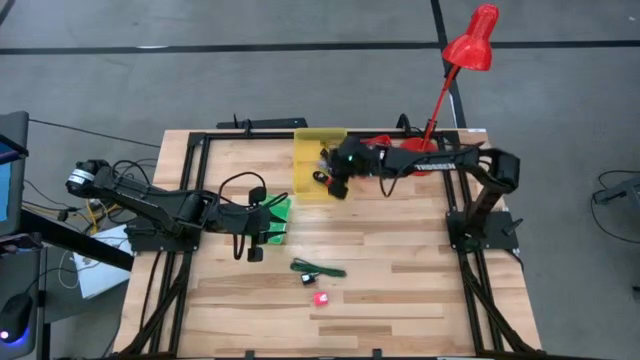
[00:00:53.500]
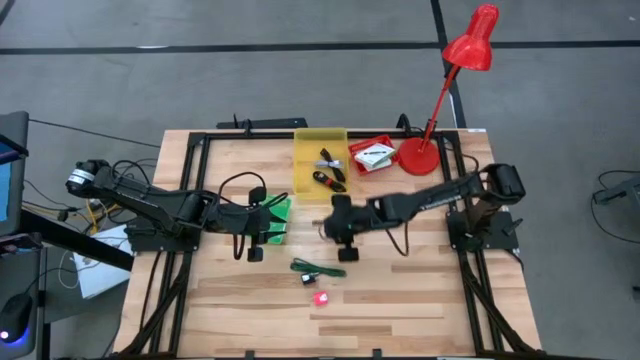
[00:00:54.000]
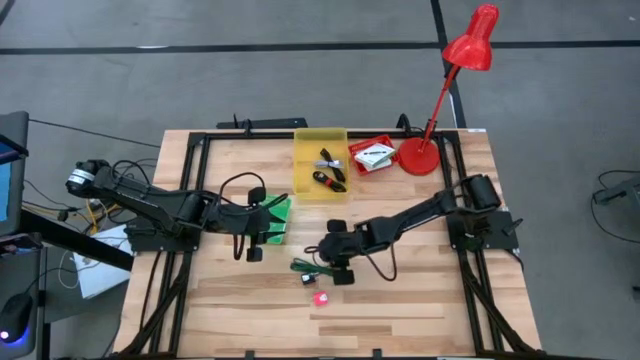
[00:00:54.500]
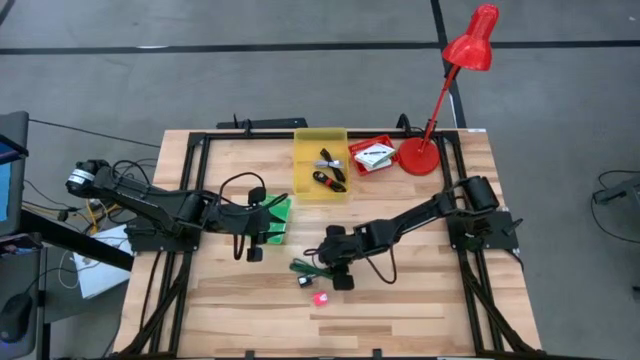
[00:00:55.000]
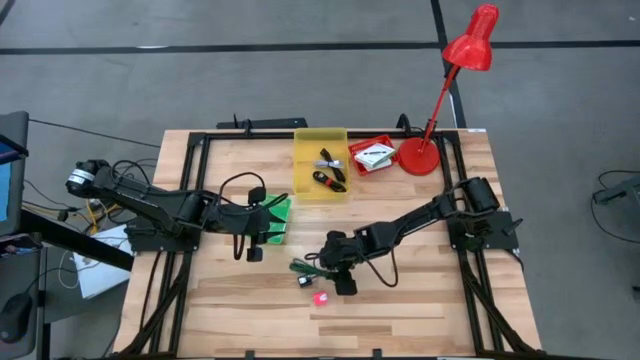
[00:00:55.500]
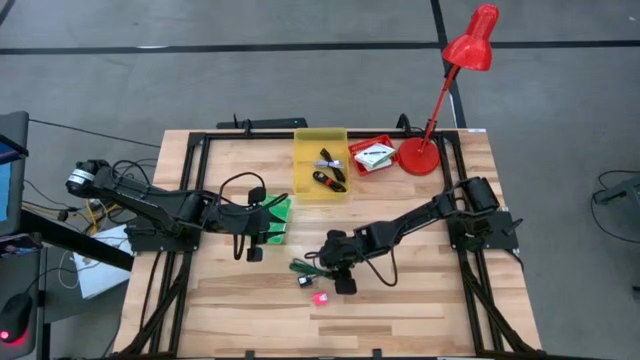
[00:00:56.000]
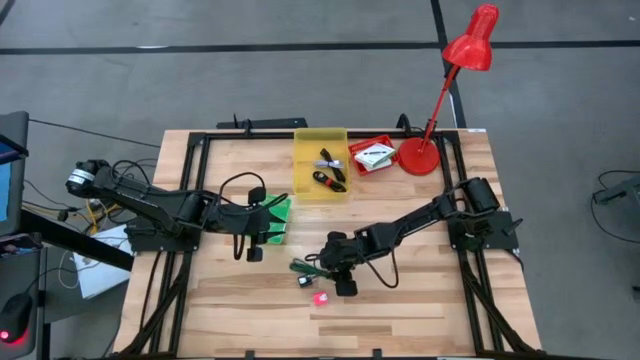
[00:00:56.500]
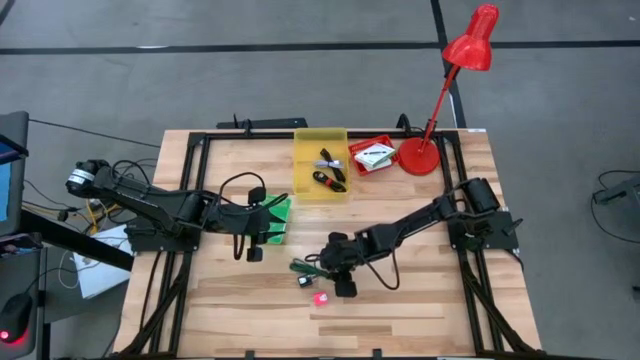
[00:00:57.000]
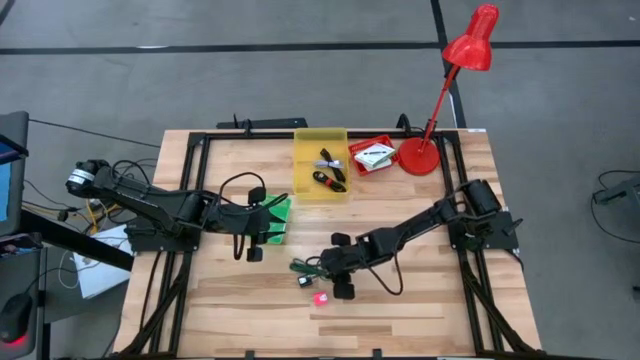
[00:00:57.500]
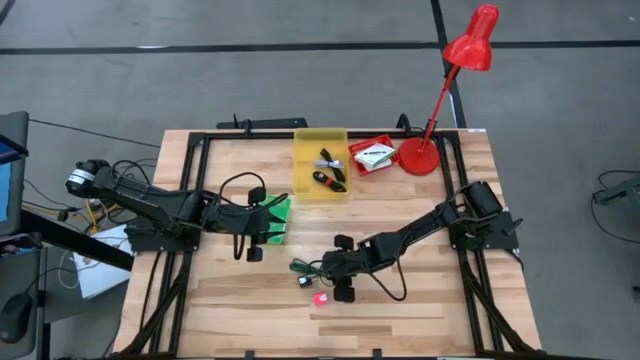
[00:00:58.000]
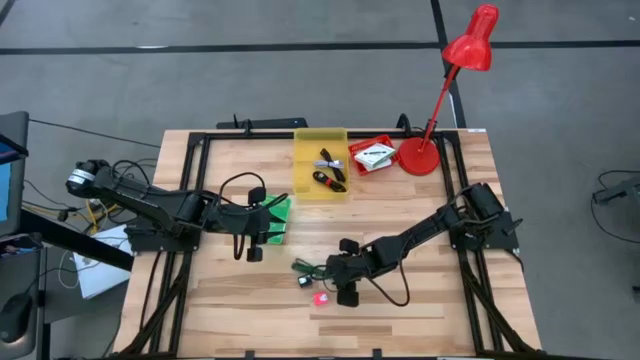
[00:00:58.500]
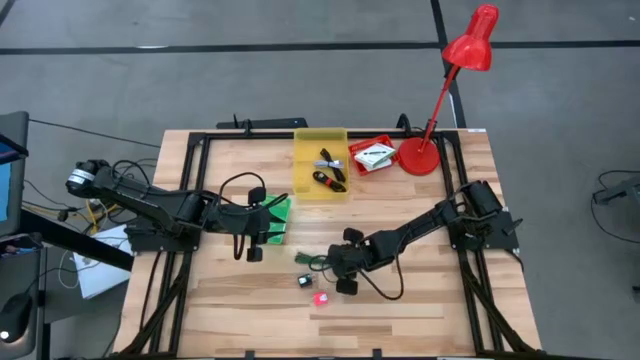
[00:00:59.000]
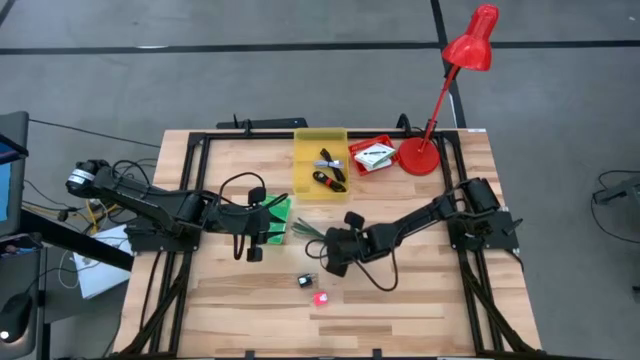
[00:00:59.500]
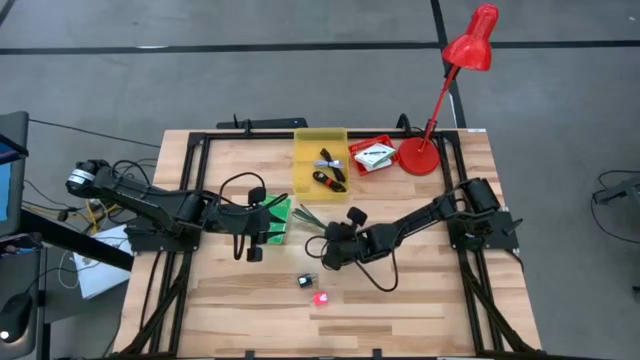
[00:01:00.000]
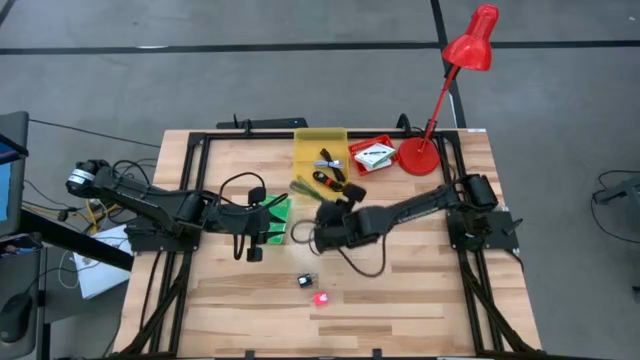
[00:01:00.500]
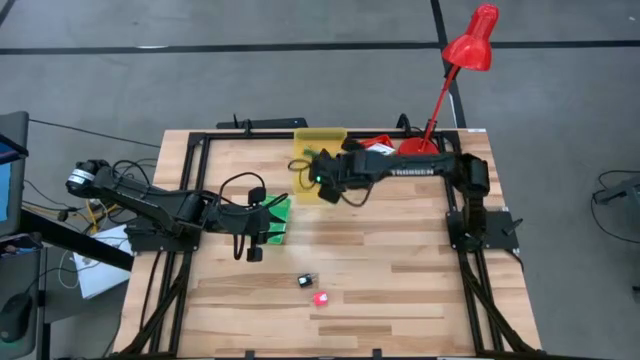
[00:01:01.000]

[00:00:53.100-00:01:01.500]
Task: Pick and place items into bin
Put the green charger cable into the yellow bin

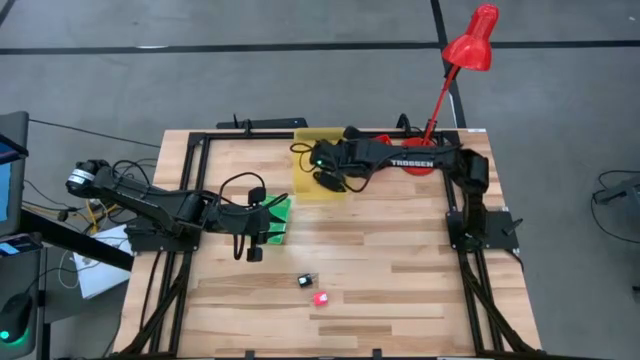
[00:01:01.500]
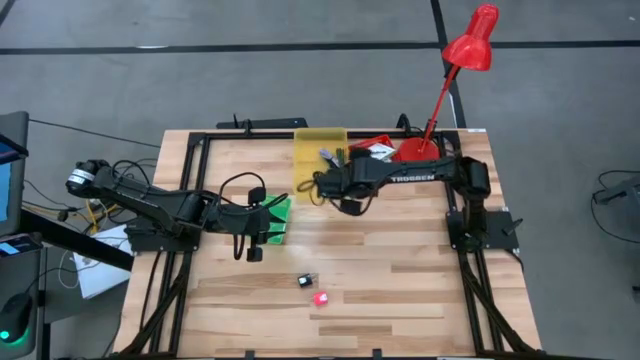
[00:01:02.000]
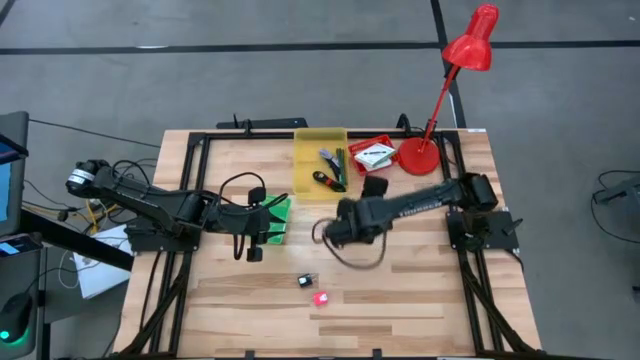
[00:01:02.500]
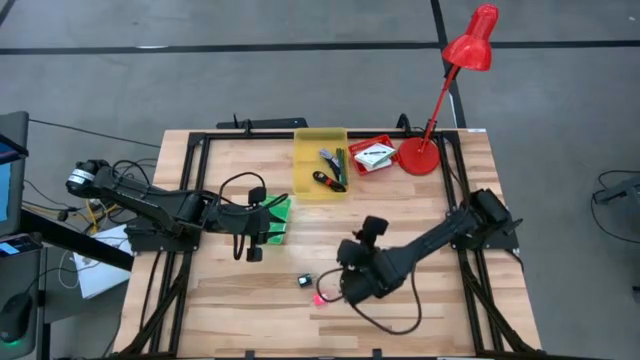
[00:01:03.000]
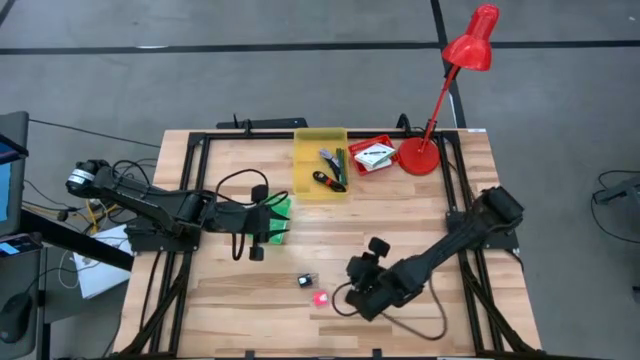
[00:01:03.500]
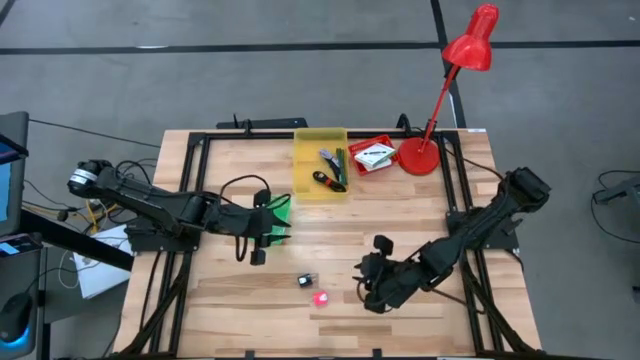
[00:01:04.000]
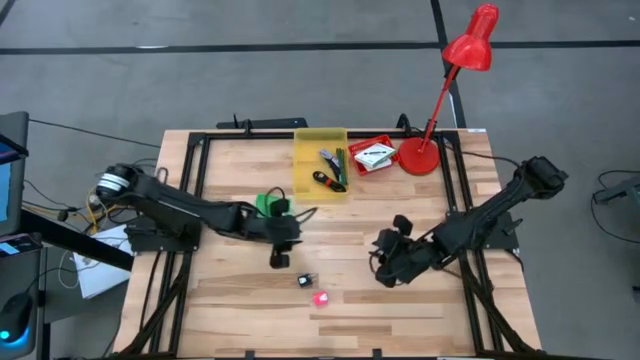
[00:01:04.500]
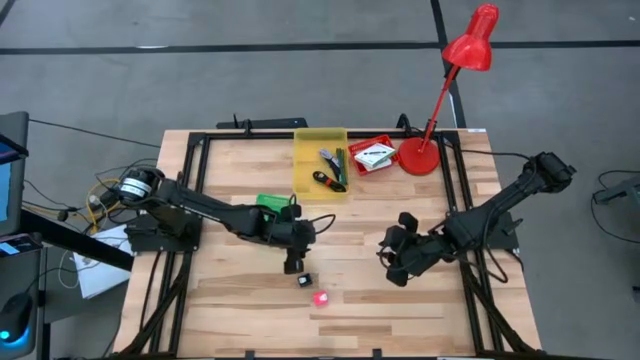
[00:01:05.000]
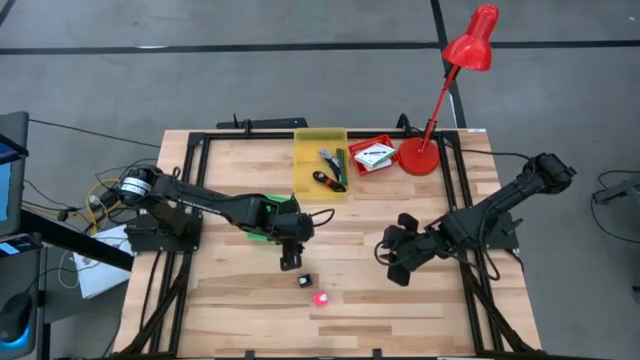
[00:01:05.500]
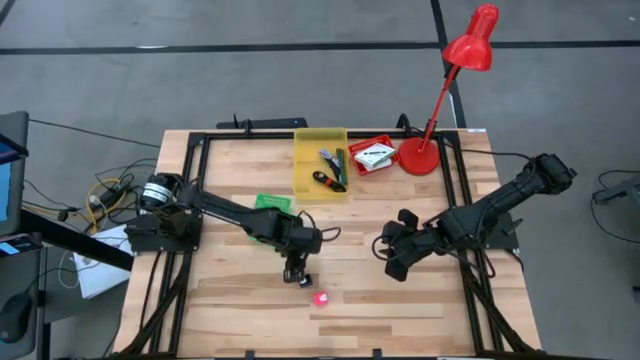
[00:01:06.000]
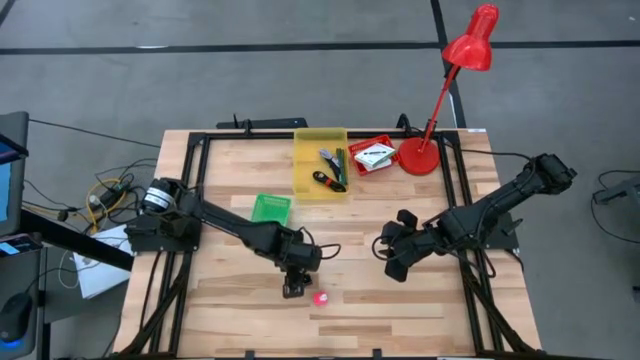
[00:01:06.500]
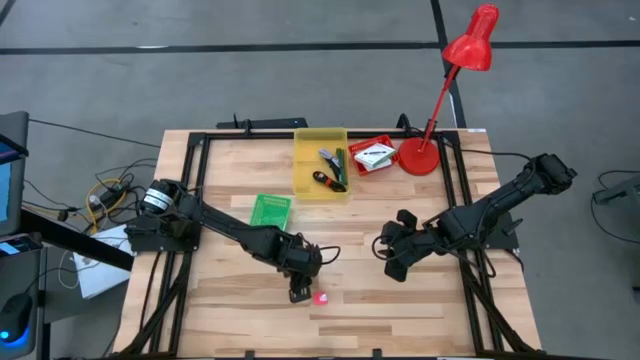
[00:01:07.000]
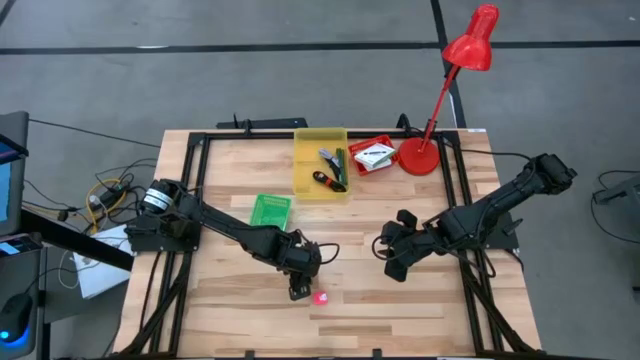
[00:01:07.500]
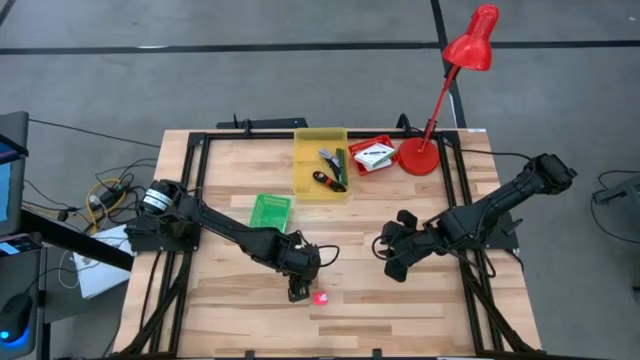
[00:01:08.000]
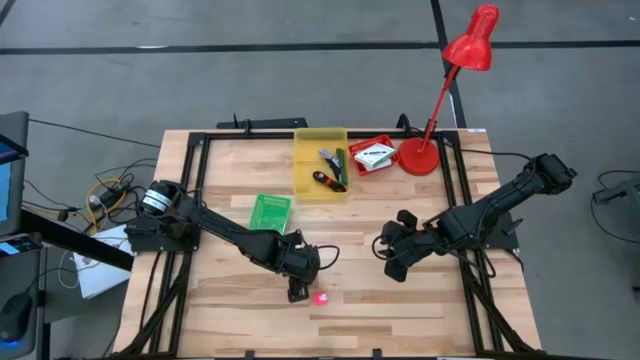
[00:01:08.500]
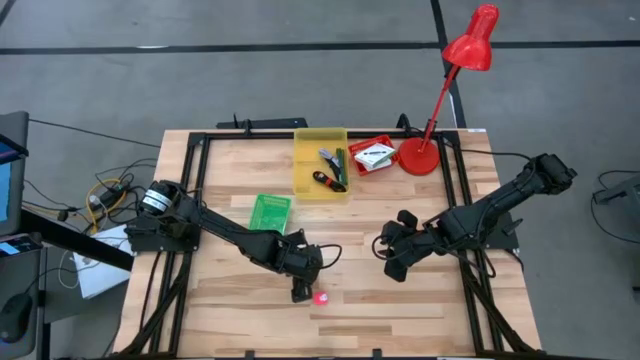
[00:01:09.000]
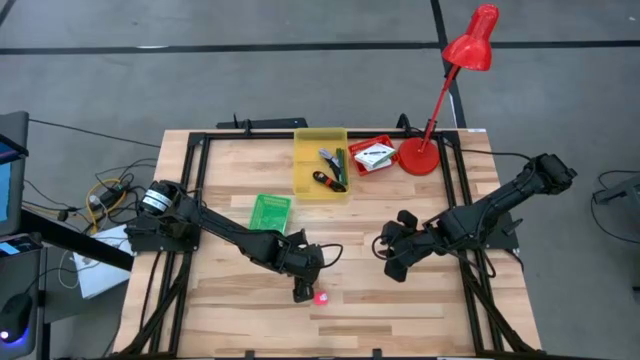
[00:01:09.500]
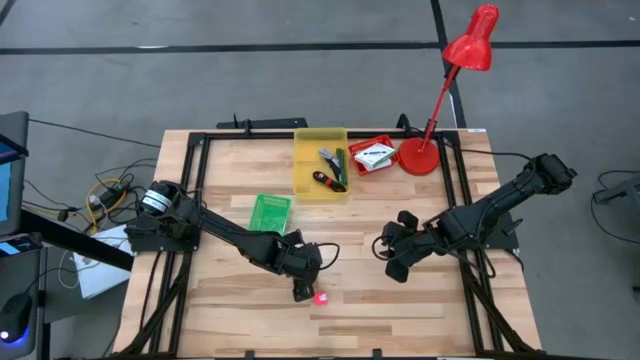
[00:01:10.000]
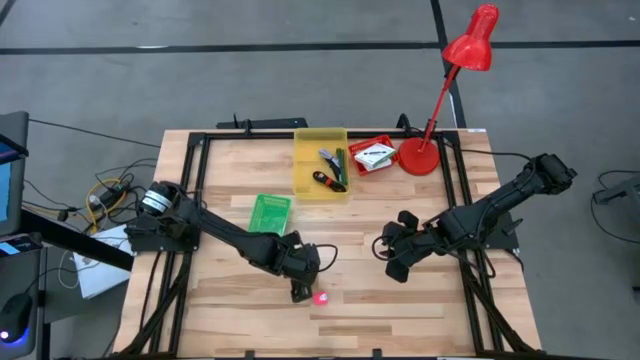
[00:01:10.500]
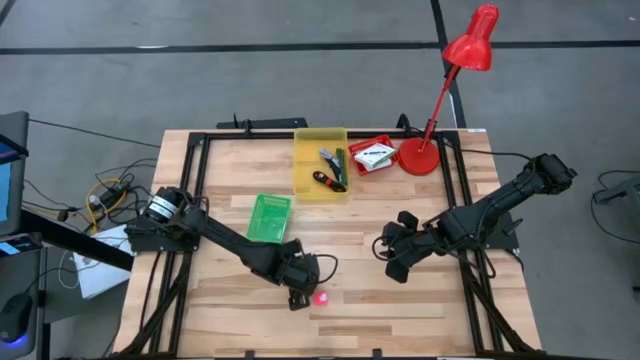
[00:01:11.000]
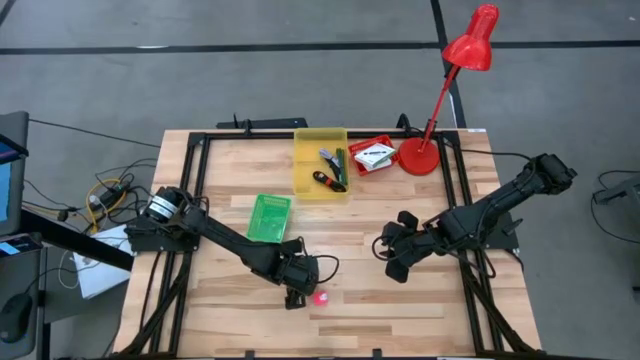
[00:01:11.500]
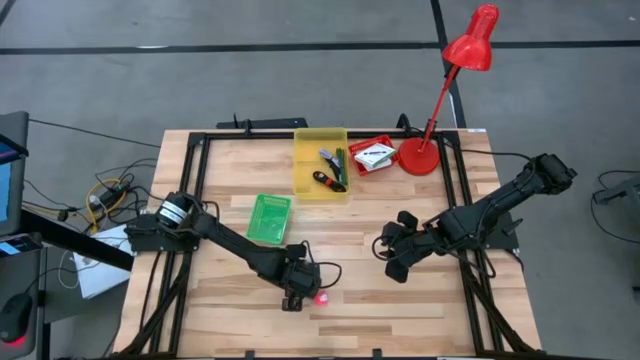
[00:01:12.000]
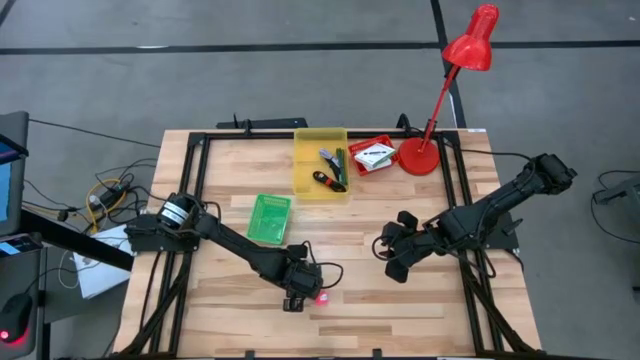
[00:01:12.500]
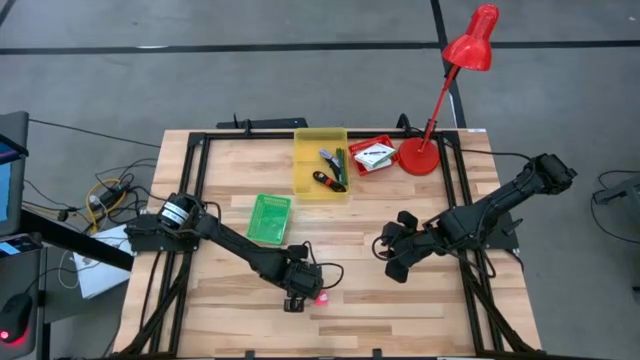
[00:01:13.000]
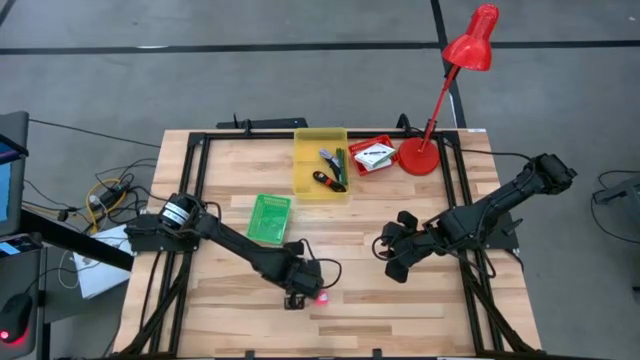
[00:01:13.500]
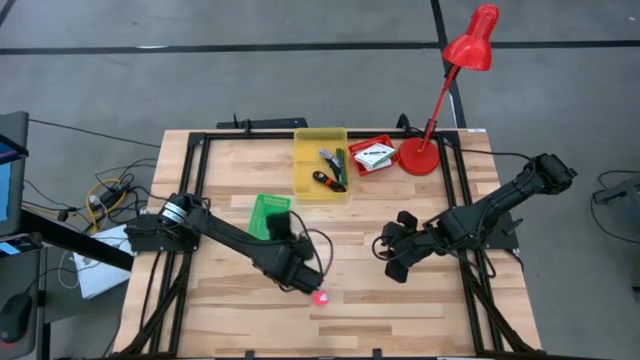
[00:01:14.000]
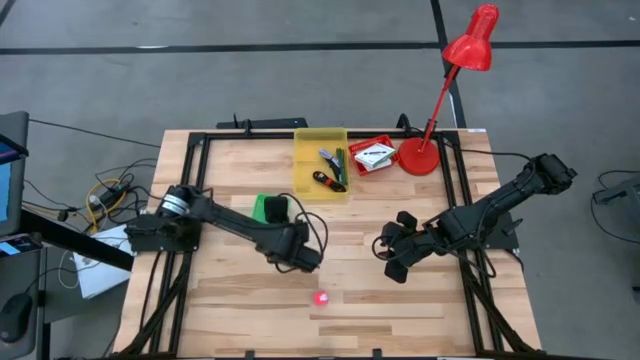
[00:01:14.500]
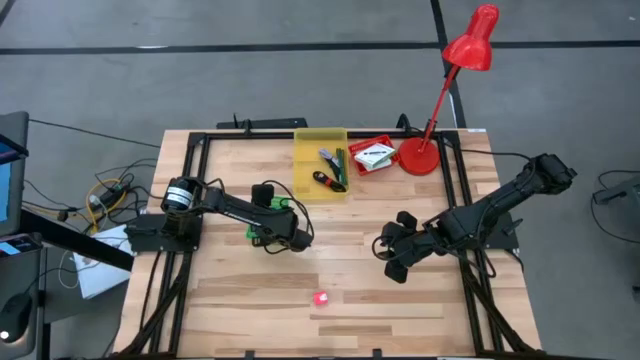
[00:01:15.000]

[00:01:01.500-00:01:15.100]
Put the black charger adapter into the green bin
